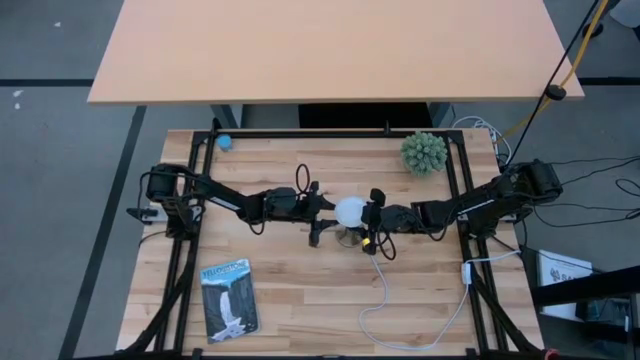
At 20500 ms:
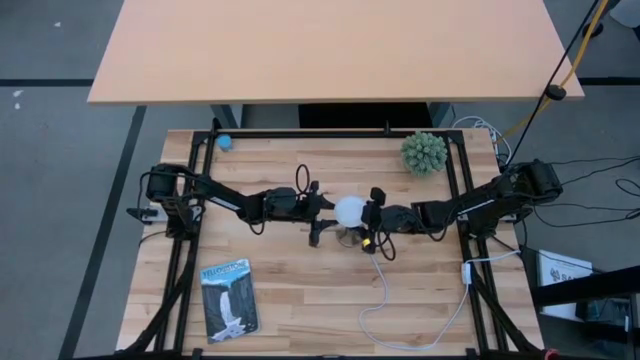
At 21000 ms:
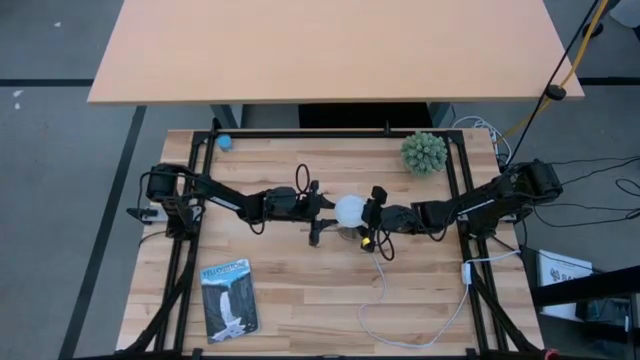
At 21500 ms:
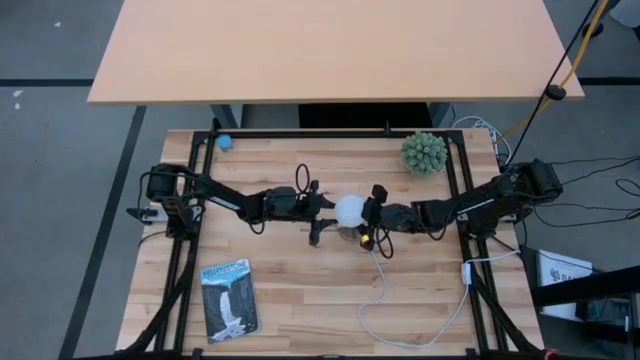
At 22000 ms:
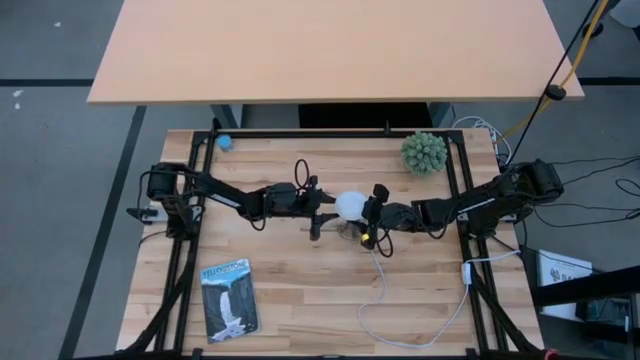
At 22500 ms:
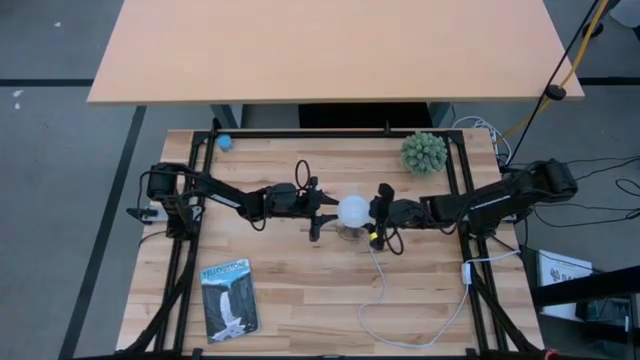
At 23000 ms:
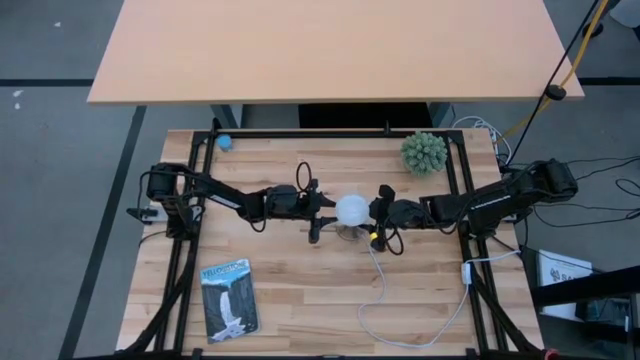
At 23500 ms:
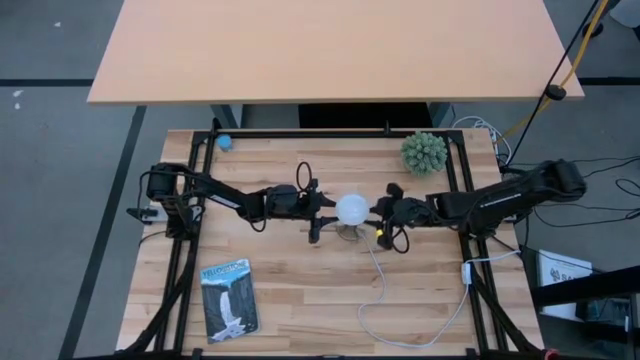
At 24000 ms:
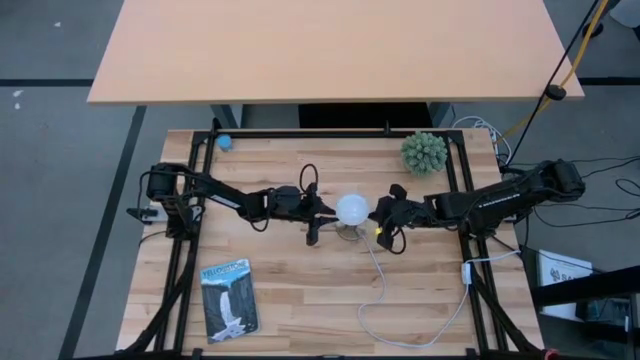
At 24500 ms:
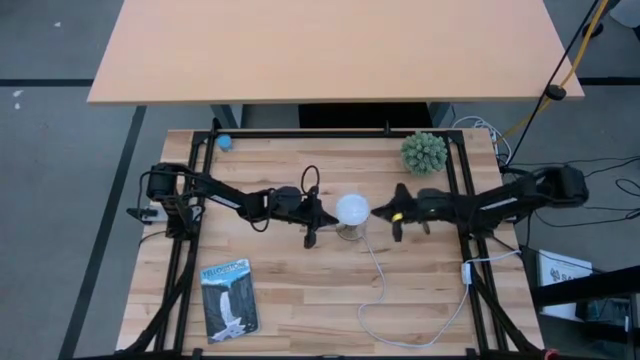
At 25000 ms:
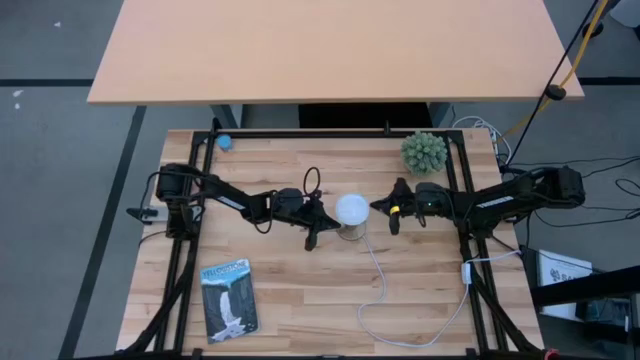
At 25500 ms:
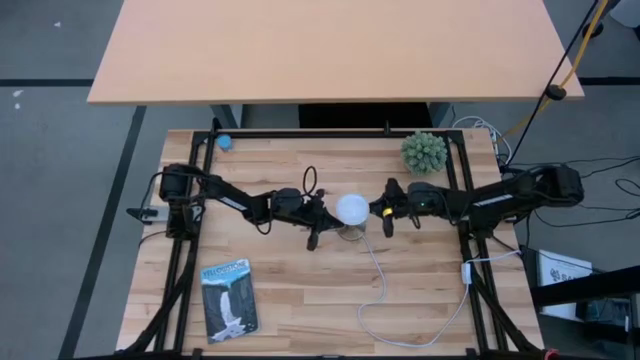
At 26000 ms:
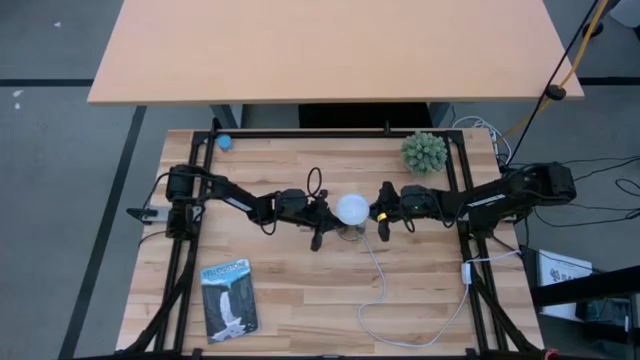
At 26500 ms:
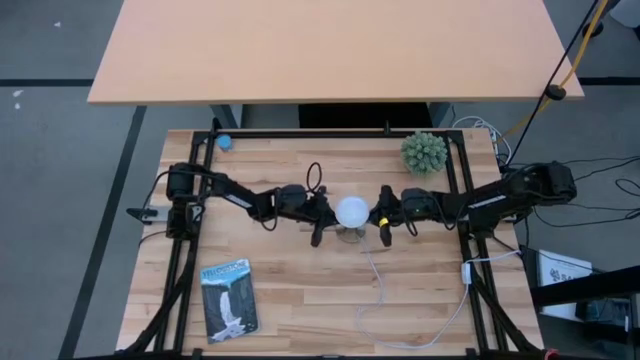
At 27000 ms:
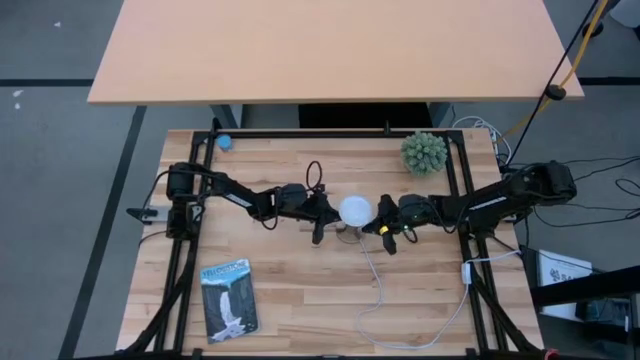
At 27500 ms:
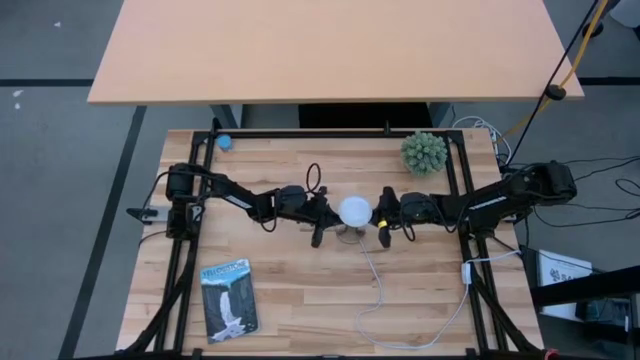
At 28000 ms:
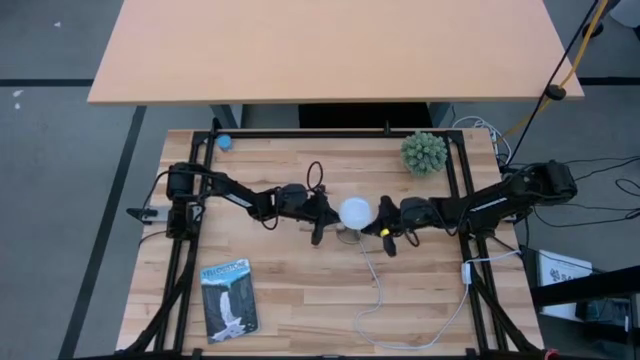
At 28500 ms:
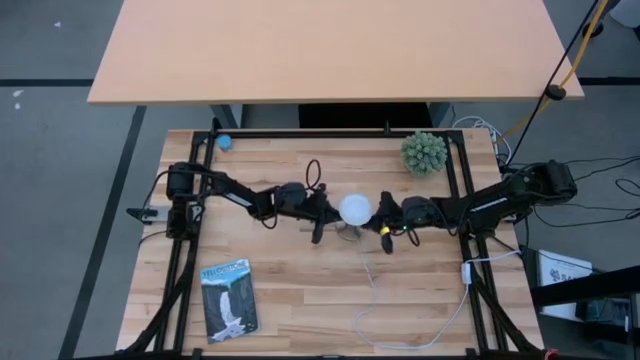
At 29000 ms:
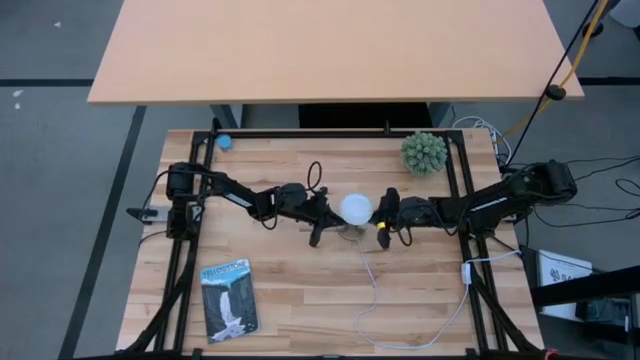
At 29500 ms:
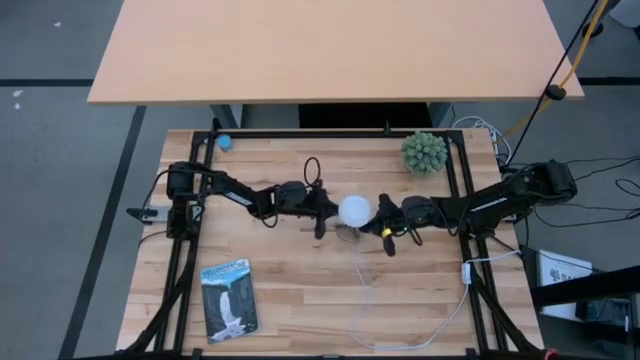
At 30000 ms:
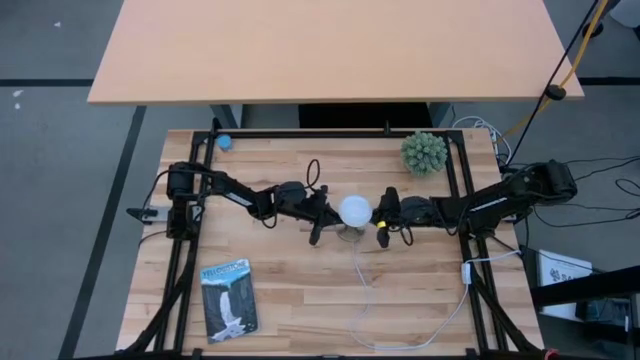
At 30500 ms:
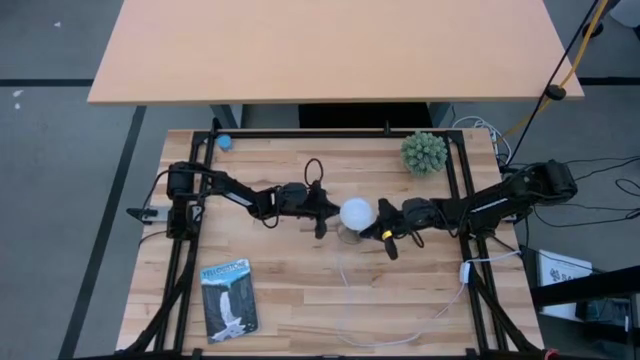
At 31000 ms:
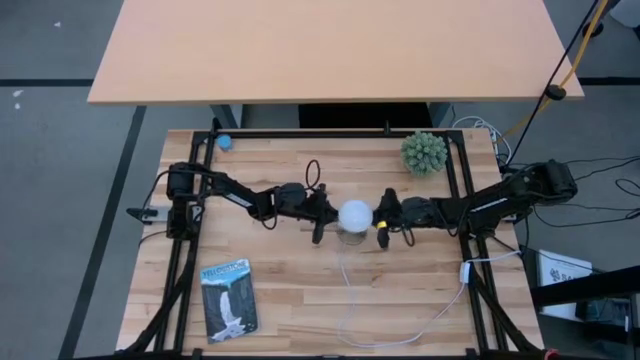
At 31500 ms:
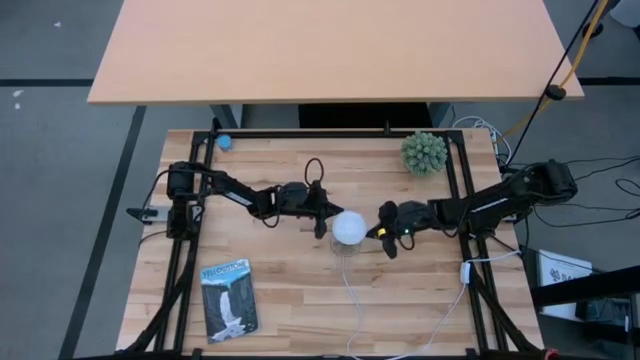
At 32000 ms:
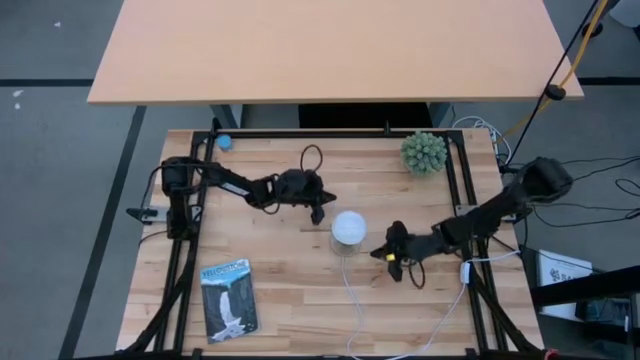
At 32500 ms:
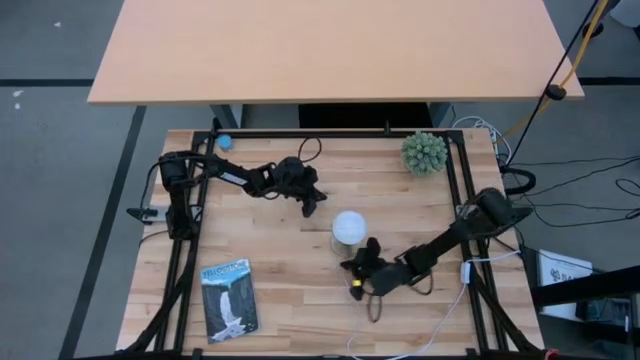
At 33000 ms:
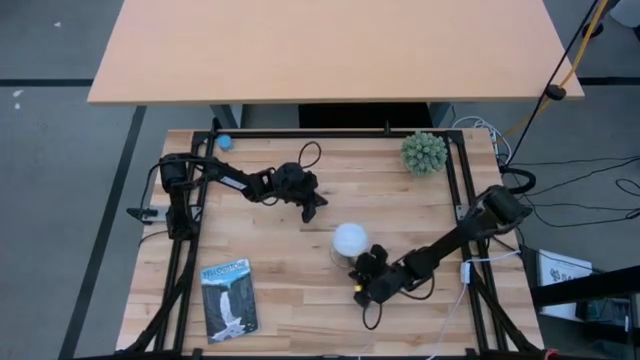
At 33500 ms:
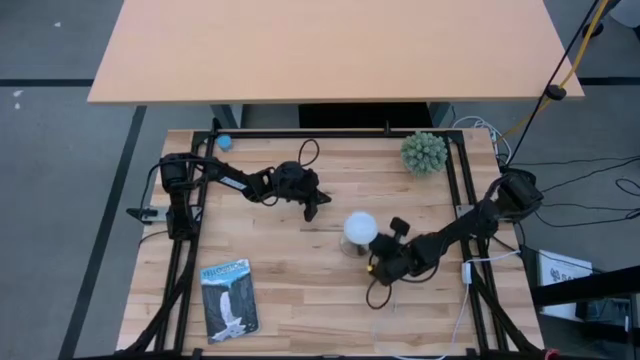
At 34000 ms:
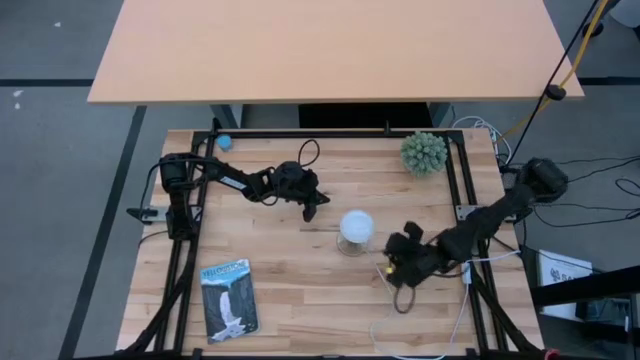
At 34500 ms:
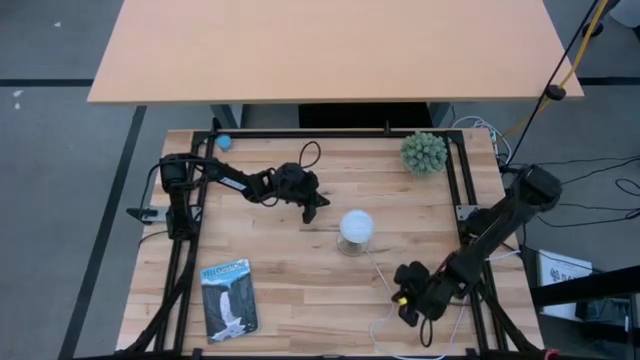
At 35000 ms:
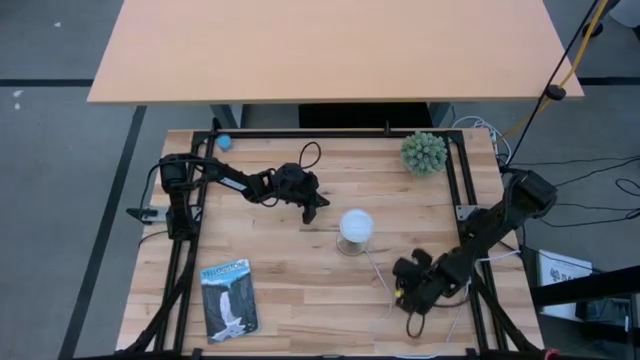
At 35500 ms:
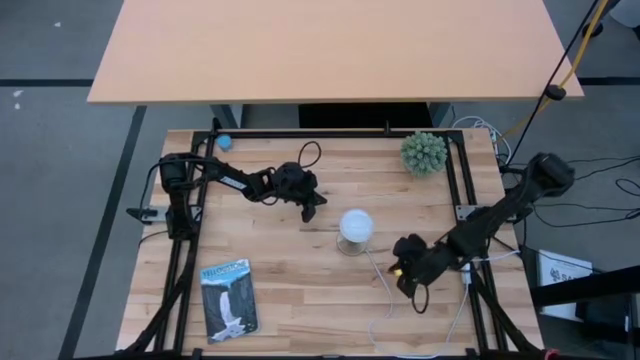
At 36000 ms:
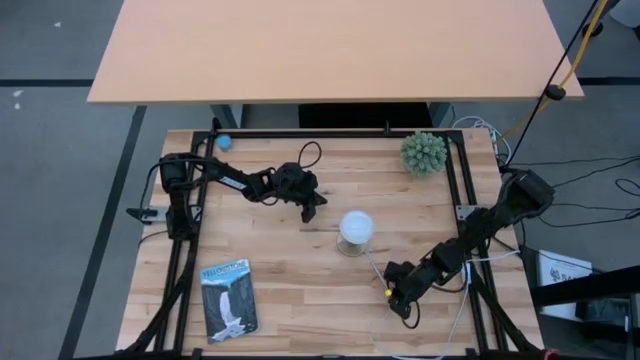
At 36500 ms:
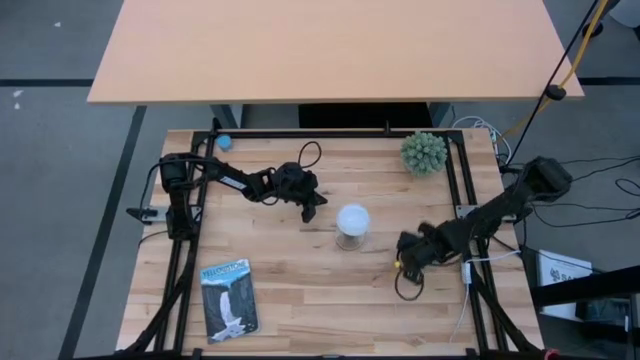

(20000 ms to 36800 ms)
Task: Screw lightbulb
Insert the lightbulb into the lamp
